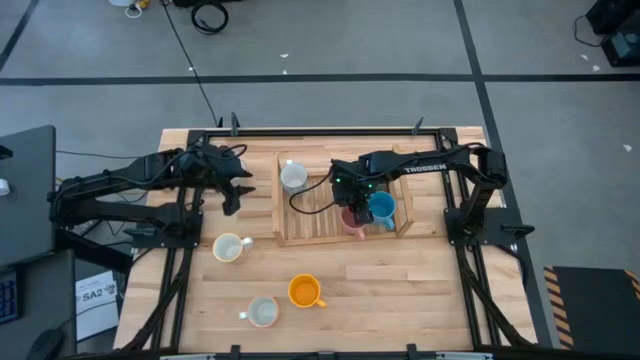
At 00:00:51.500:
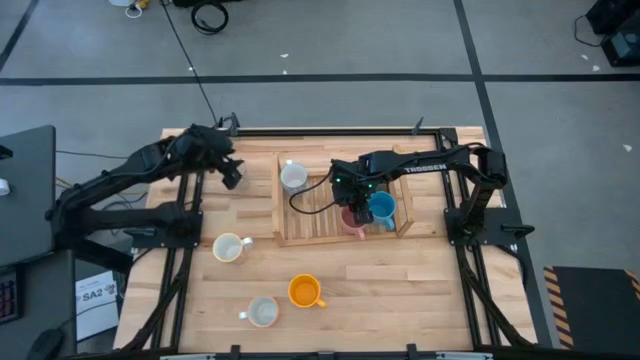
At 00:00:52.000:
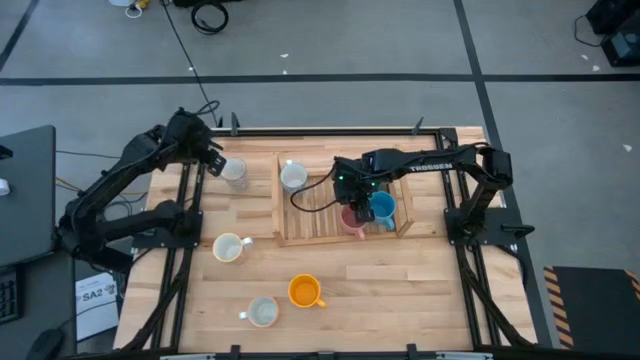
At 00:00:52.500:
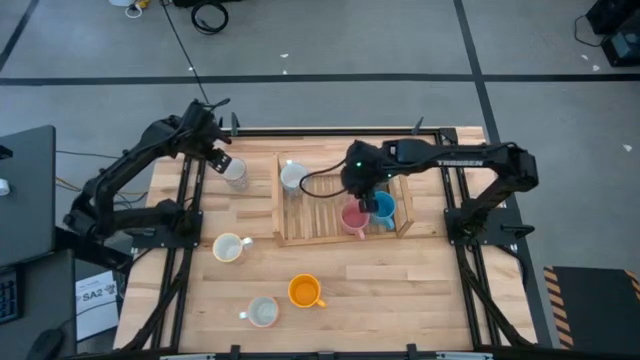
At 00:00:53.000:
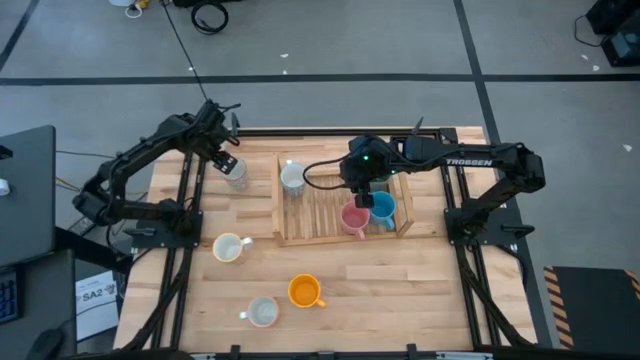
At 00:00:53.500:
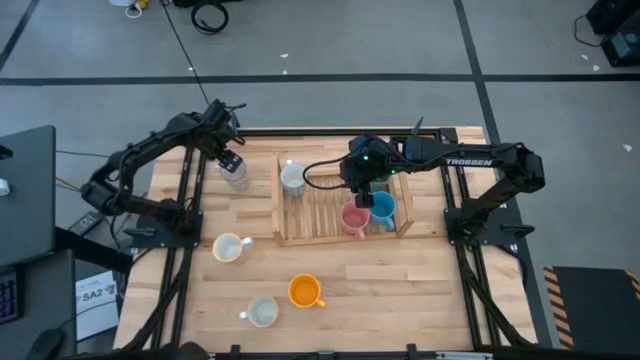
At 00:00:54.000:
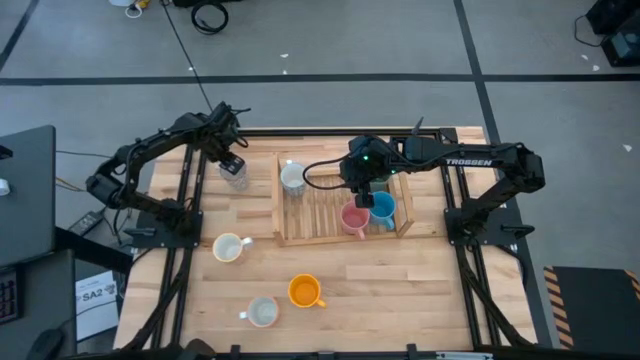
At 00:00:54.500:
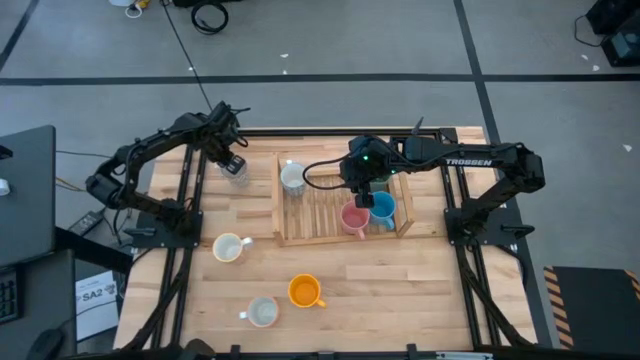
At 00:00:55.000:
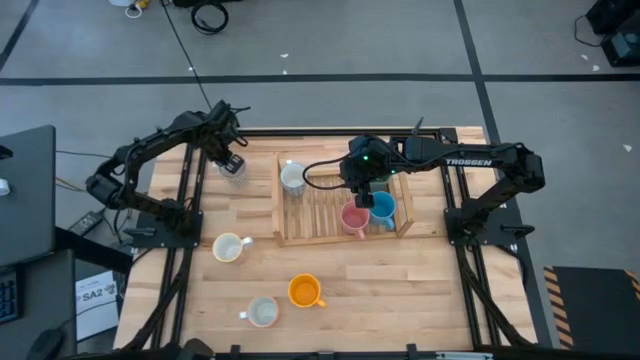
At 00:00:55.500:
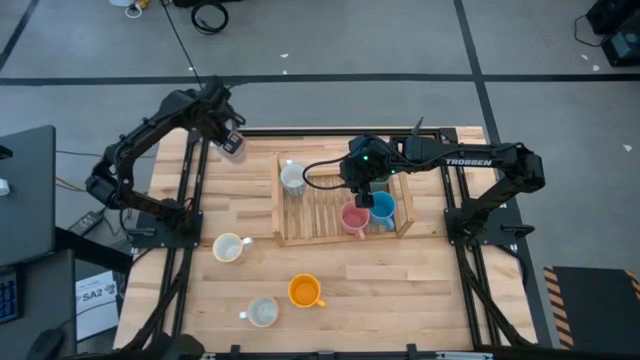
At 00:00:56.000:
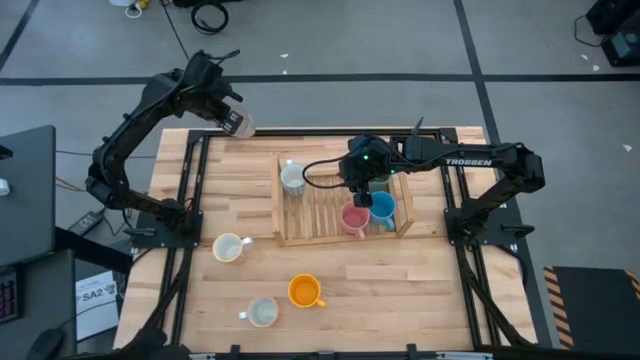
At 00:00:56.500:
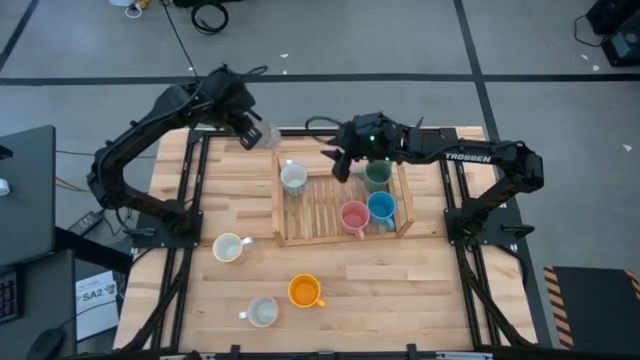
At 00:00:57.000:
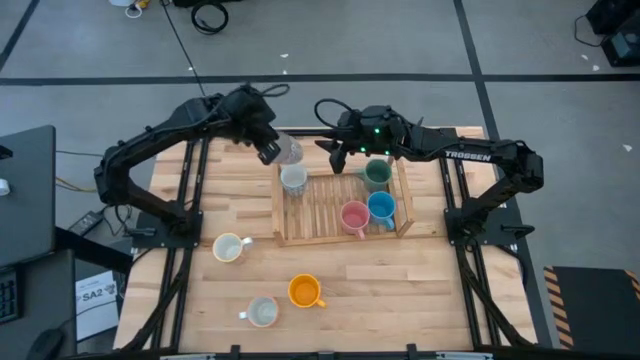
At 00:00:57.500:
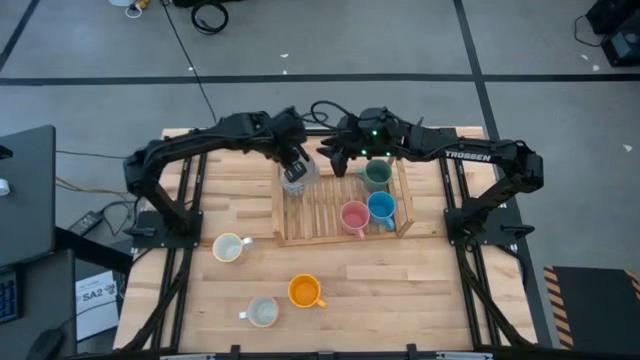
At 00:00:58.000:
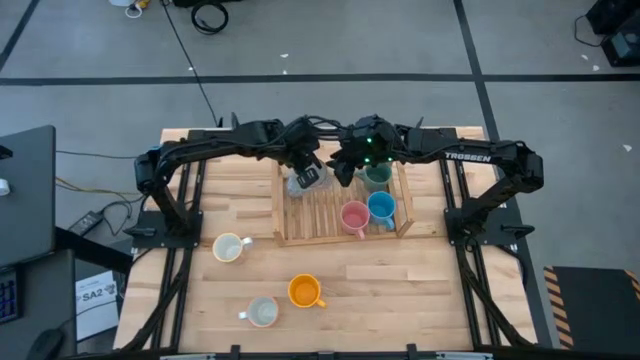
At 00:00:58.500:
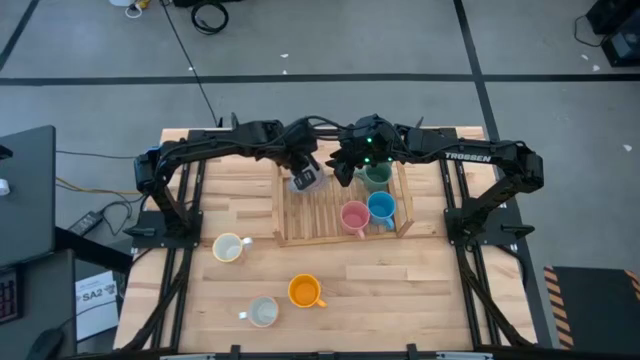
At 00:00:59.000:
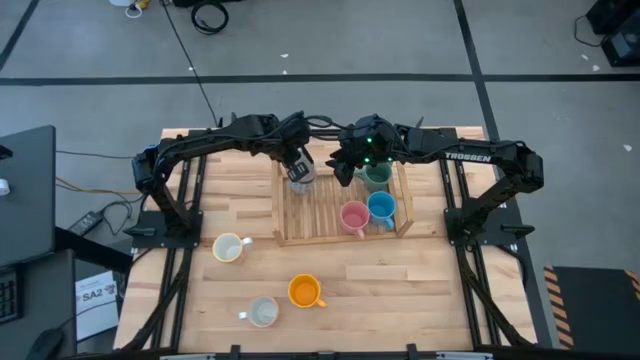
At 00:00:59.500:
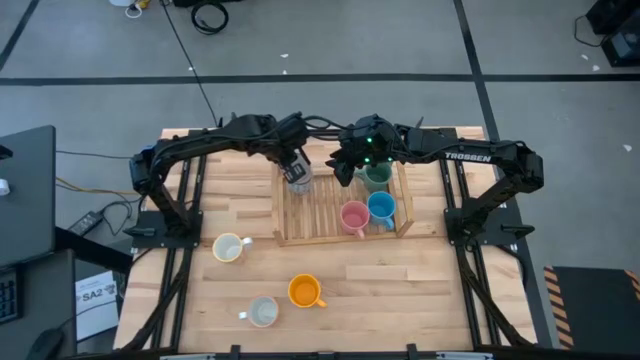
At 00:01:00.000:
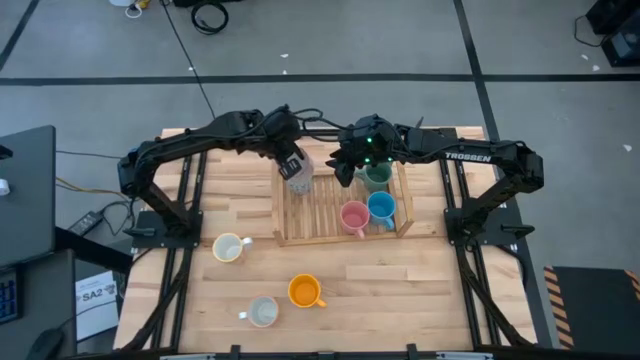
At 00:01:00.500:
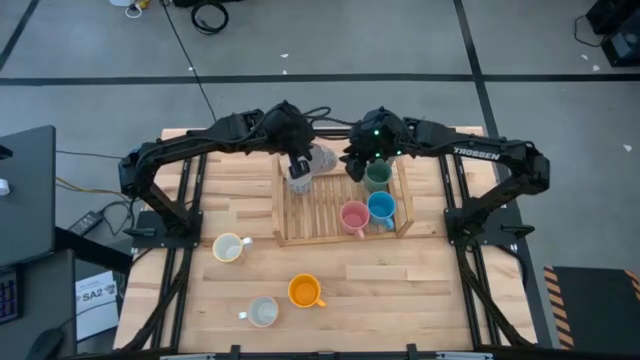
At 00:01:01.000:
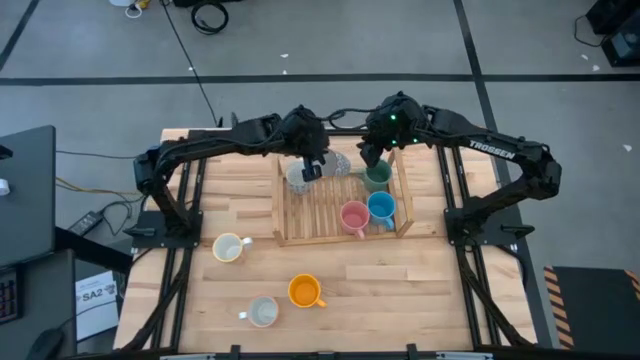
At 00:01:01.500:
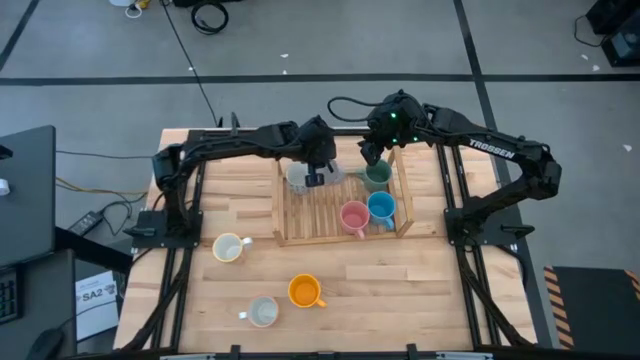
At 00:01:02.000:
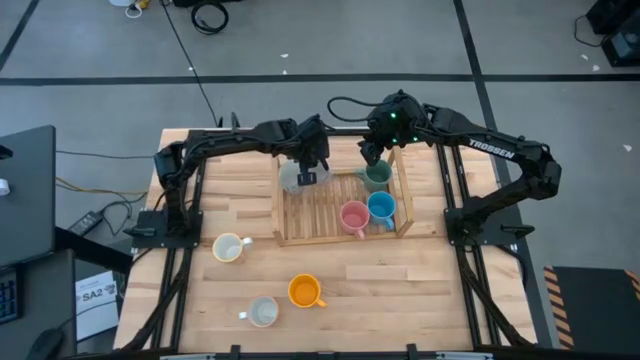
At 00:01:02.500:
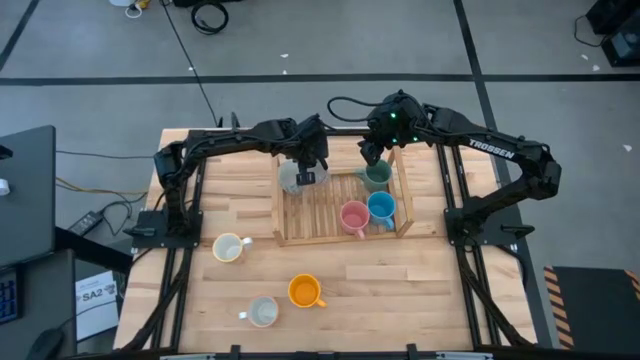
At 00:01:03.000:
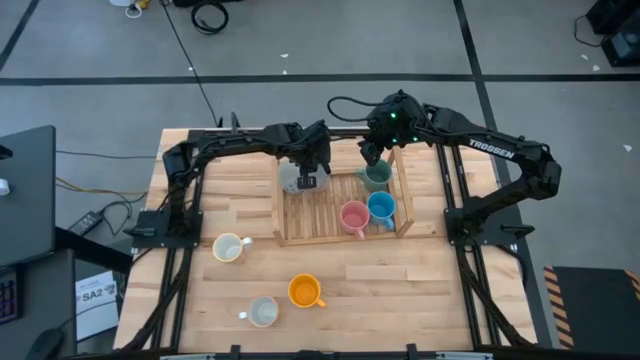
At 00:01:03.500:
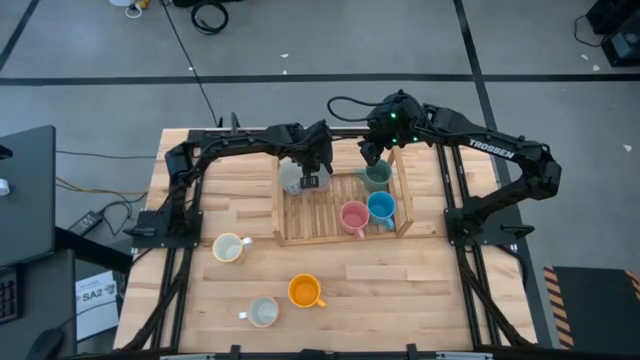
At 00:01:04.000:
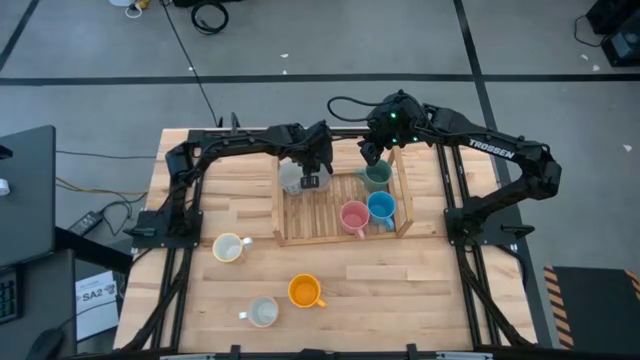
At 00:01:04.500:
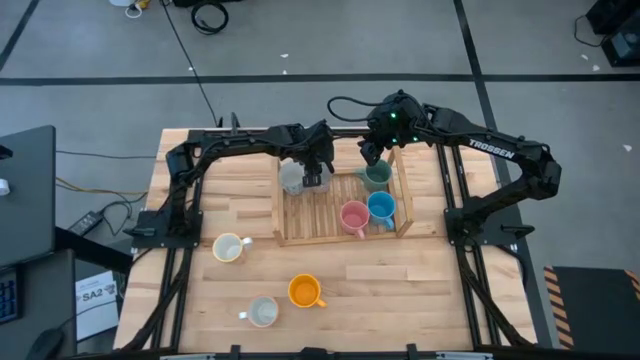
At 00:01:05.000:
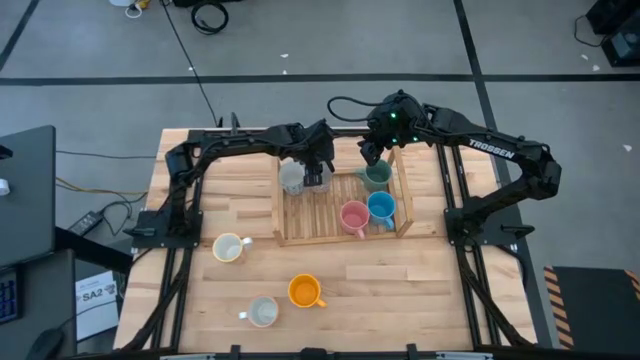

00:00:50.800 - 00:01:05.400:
Task: Place coffee mugs
Put the gray cup on the shelf
